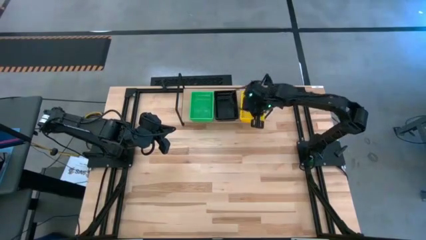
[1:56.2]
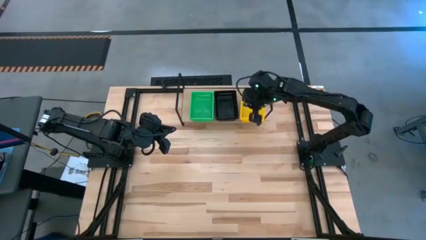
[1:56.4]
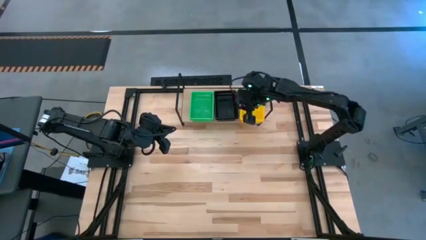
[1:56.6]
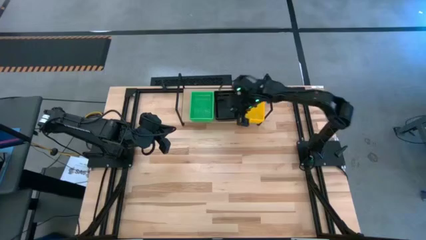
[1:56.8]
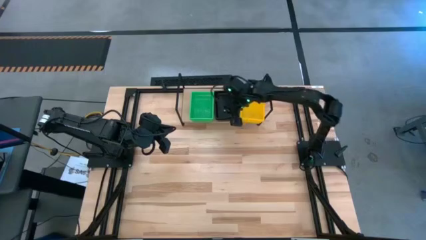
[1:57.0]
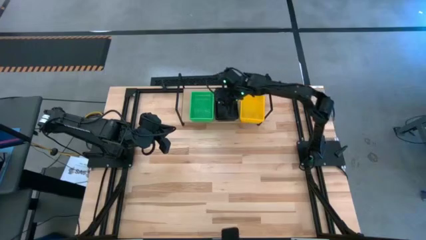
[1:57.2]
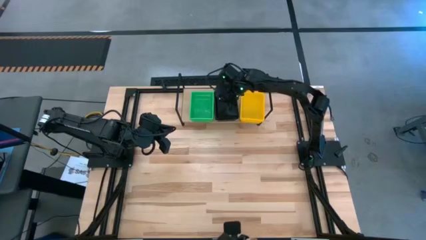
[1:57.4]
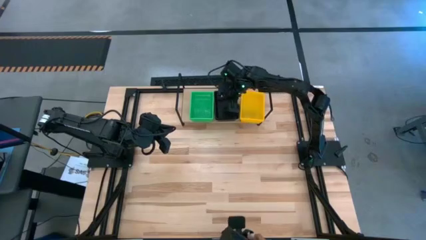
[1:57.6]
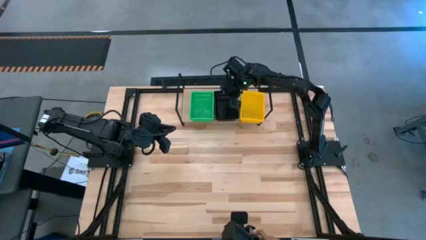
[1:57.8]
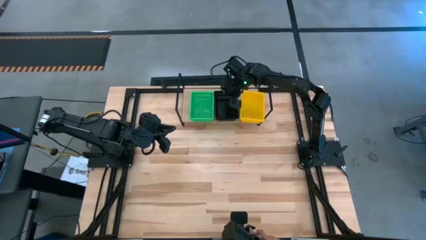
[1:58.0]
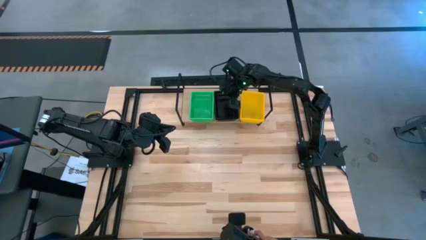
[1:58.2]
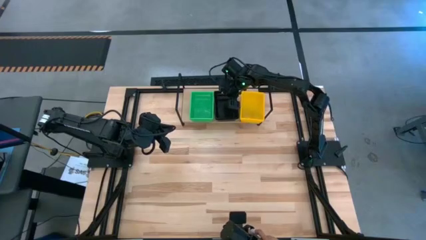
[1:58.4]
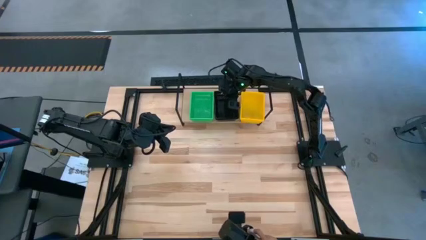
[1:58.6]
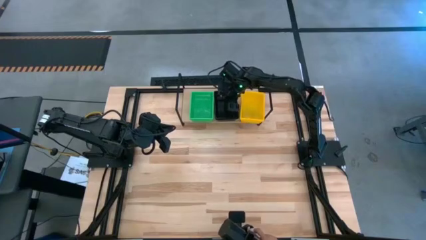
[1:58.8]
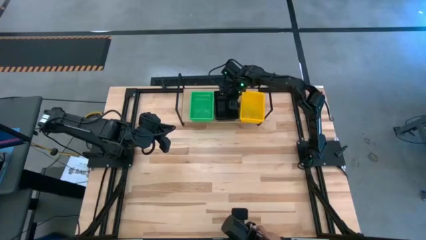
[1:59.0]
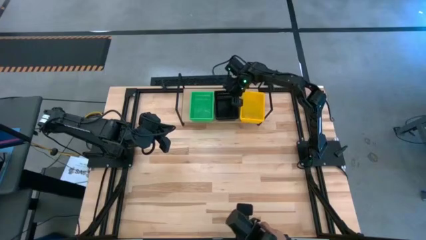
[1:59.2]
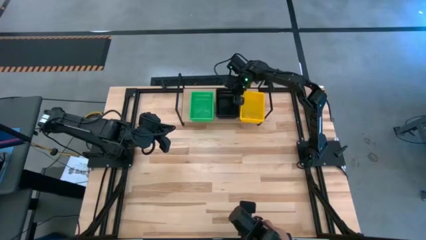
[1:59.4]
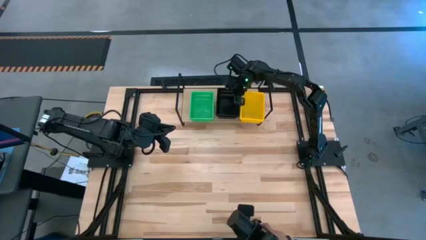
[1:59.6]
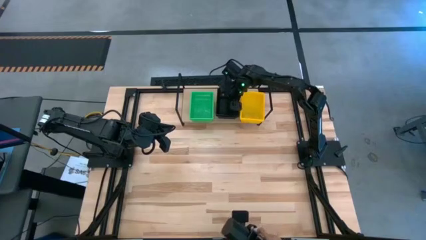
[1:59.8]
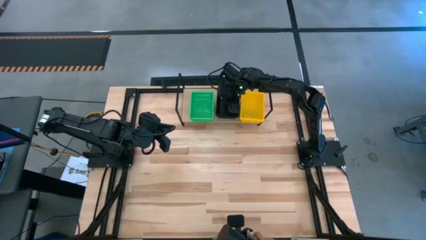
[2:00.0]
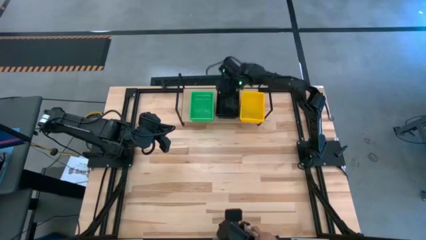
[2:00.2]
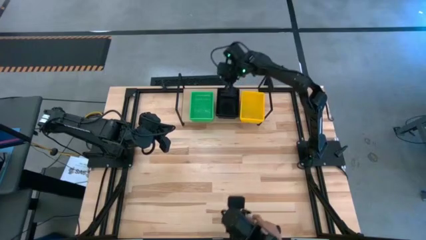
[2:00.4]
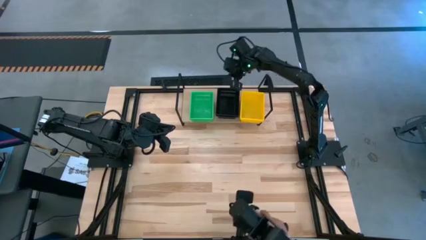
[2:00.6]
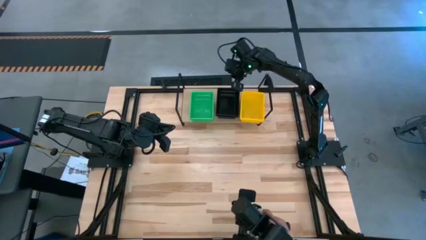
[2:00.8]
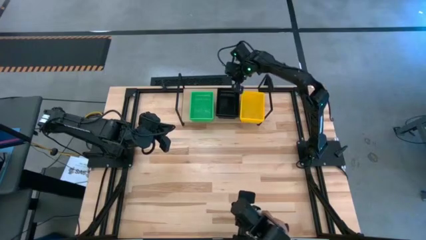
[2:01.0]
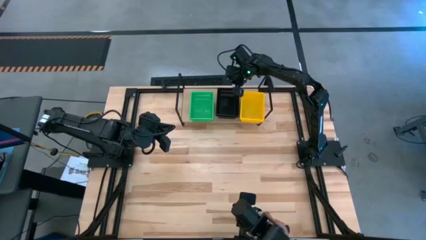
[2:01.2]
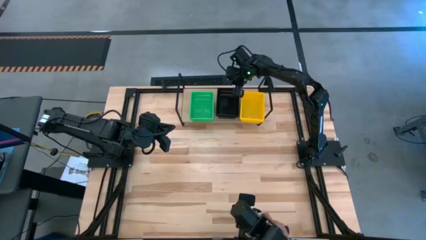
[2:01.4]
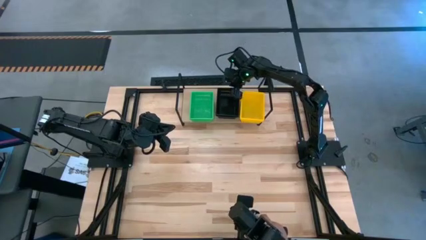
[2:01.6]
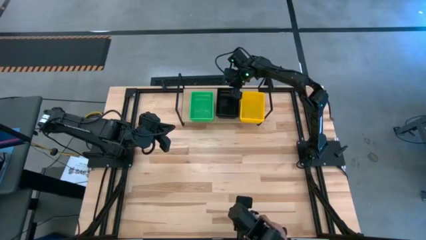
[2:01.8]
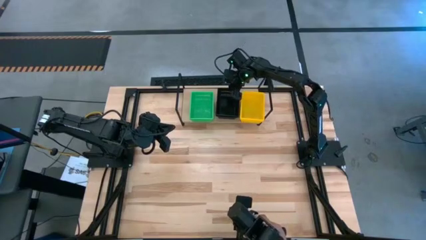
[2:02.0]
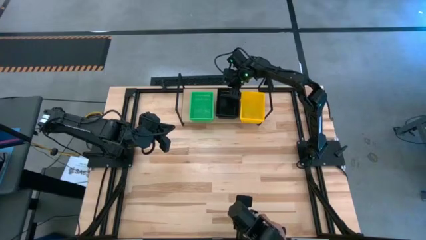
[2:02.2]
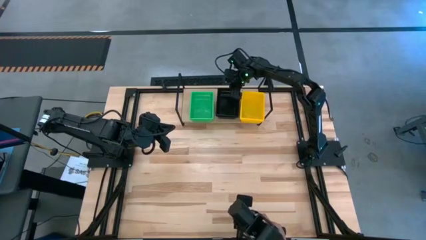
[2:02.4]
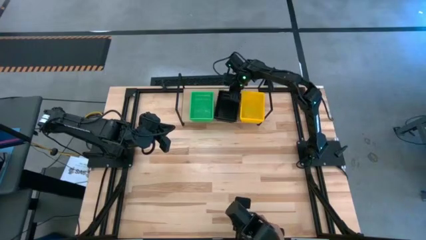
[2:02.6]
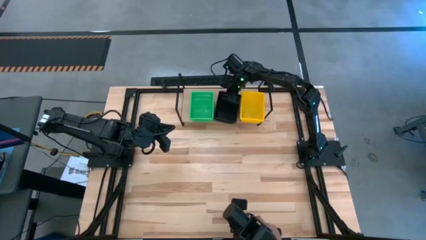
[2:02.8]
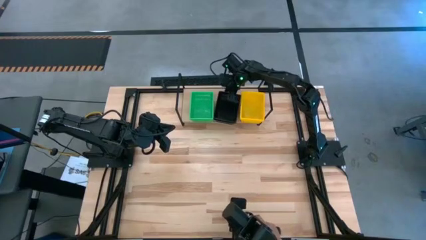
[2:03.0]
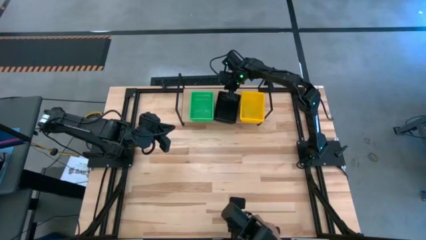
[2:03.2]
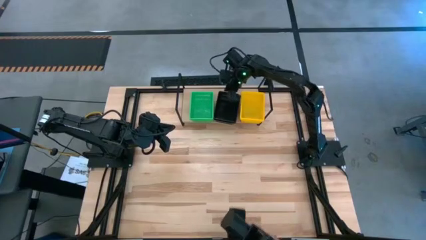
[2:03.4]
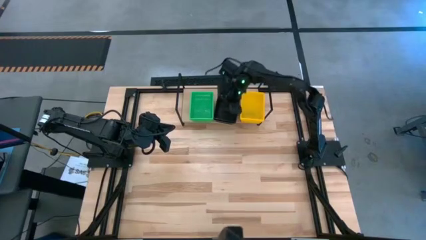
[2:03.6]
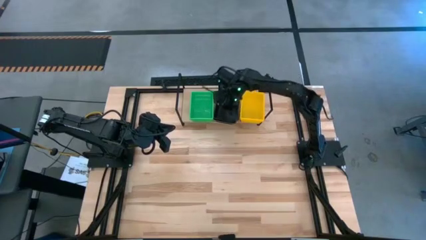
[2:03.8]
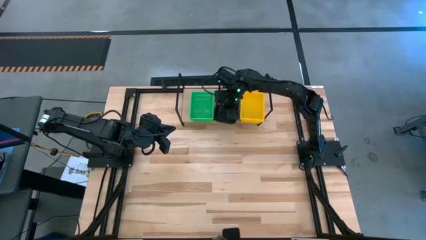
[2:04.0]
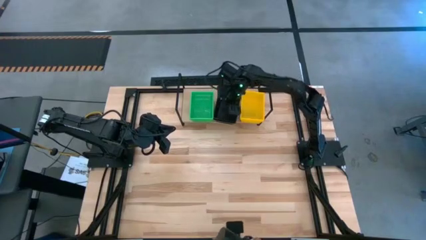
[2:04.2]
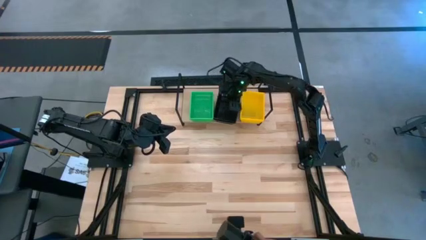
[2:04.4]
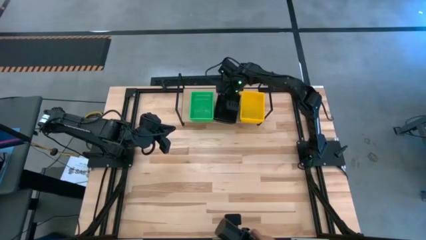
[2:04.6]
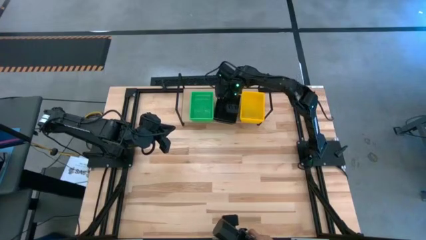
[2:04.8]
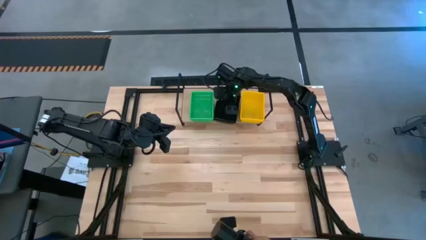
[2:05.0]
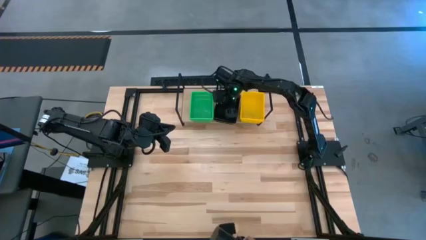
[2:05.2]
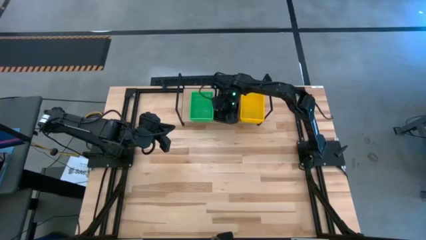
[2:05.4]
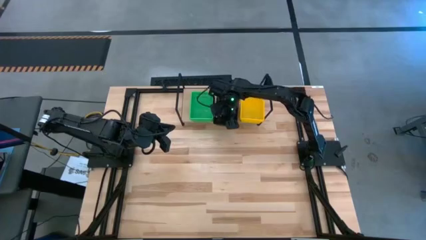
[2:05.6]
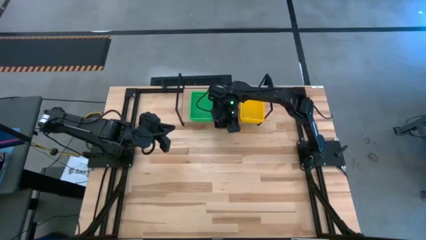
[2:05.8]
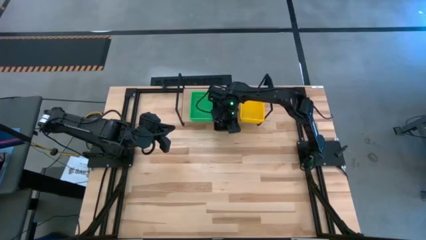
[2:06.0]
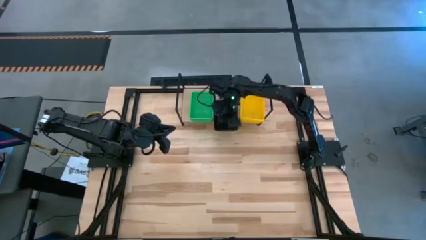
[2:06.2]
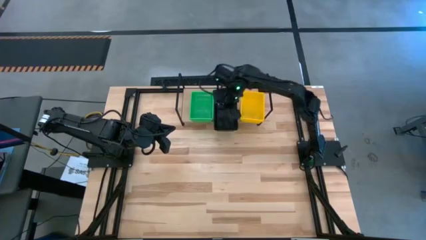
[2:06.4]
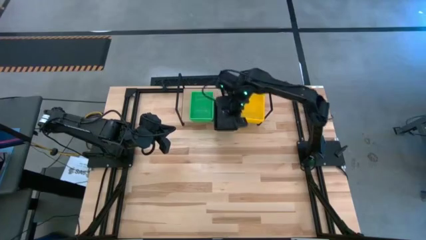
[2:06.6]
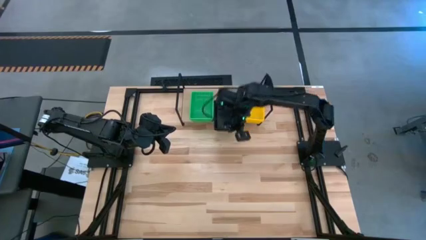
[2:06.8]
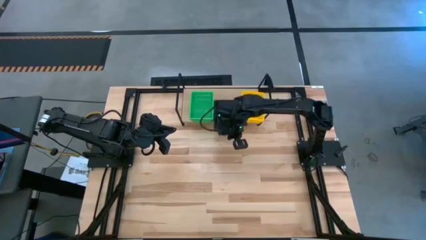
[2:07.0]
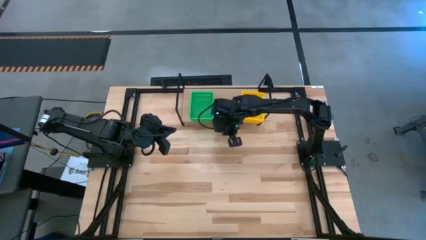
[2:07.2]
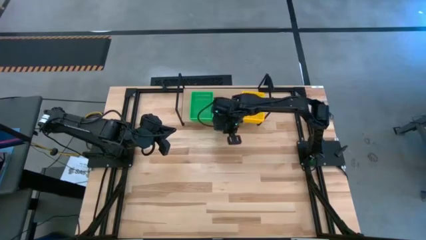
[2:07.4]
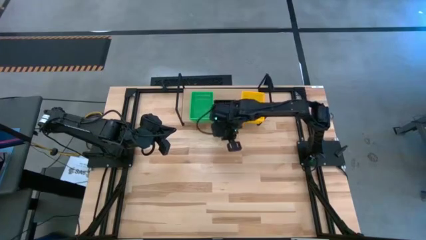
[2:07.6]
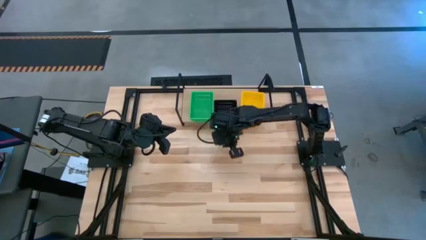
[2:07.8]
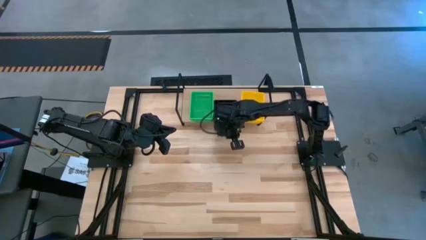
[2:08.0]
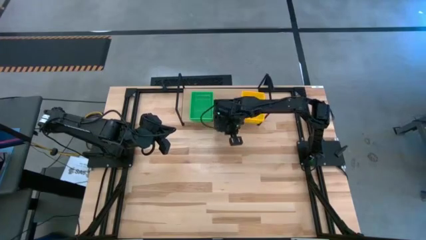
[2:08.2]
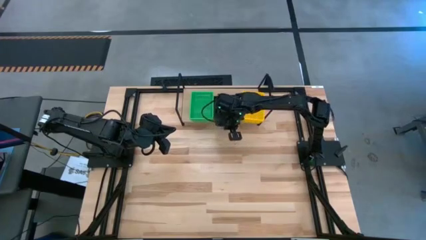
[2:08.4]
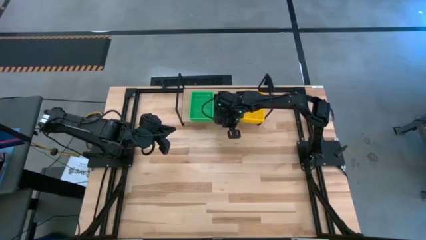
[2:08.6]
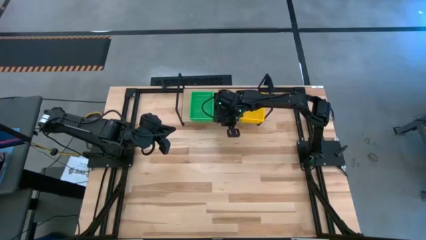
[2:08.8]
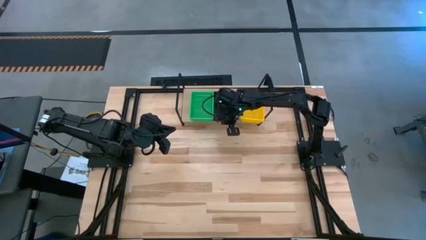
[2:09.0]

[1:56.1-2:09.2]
Task: Stack baskets on shelf by color
Adjust the stacked black bins on the shelf

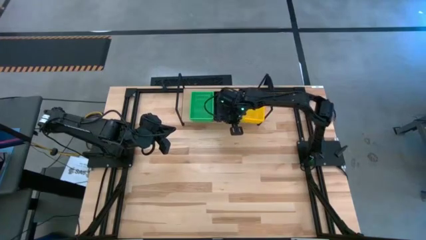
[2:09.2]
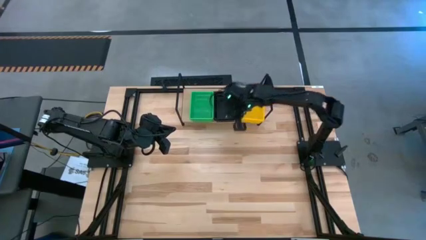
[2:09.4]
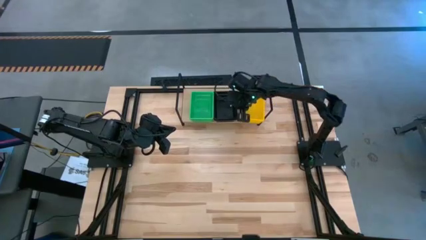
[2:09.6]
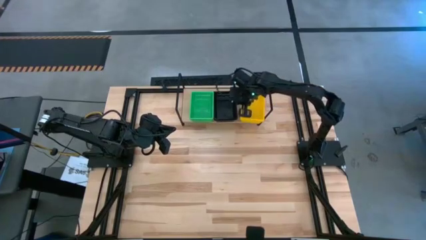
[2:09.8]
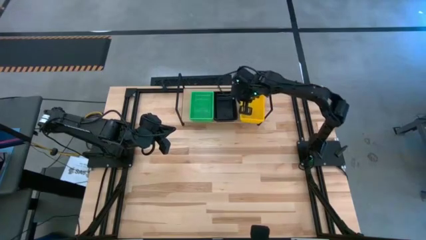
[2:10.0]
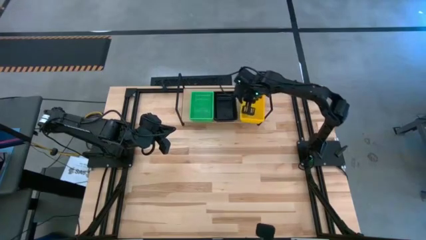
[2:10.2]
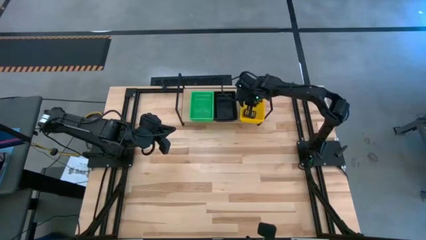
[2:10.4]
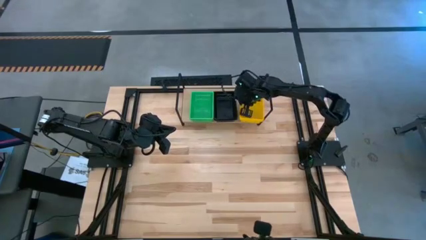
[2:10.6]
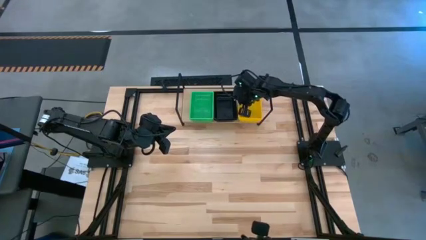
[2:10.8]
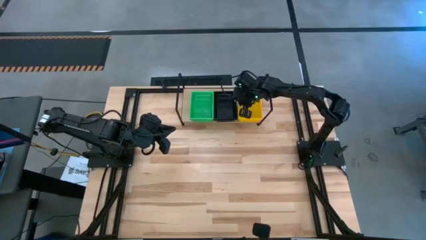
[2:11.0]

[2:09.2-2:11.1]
Adjust the stacked yellow bins on the shelf
